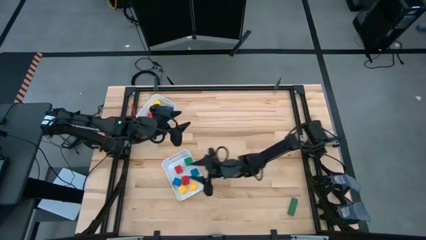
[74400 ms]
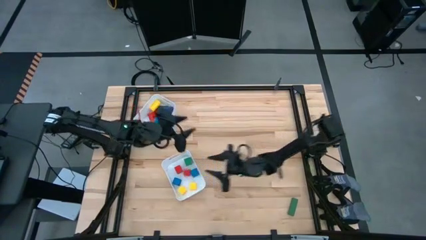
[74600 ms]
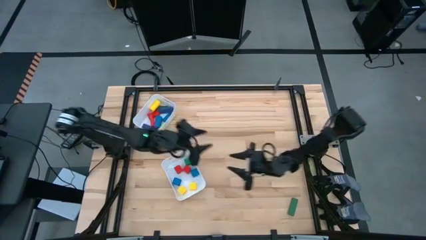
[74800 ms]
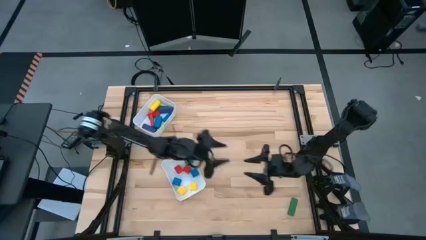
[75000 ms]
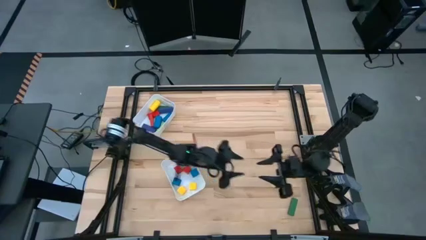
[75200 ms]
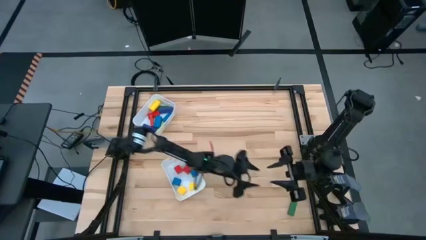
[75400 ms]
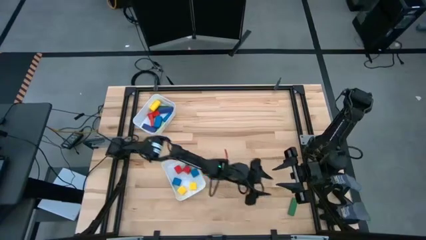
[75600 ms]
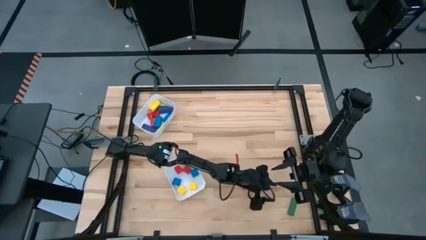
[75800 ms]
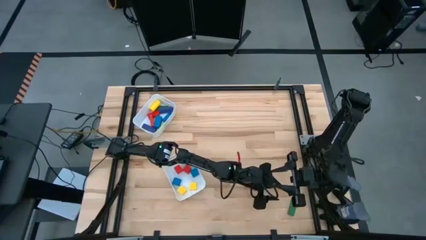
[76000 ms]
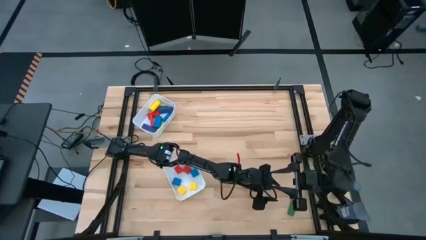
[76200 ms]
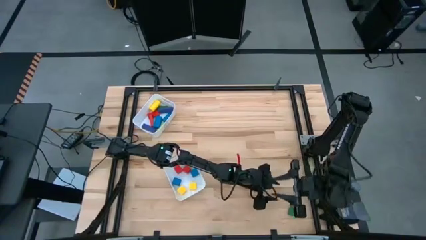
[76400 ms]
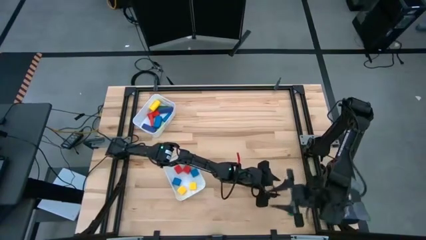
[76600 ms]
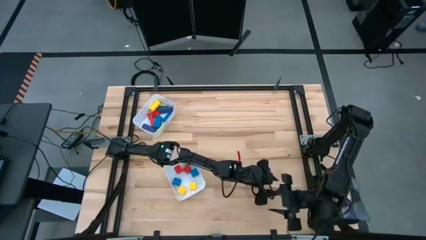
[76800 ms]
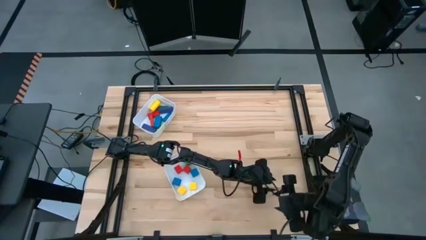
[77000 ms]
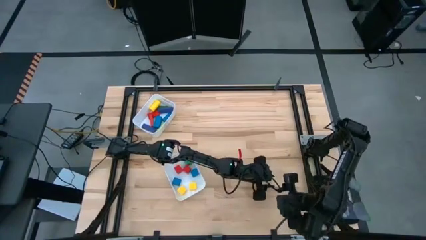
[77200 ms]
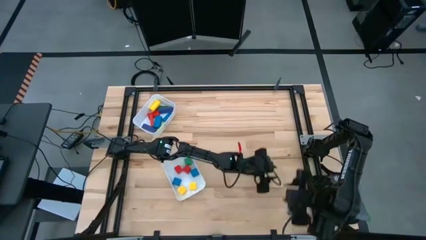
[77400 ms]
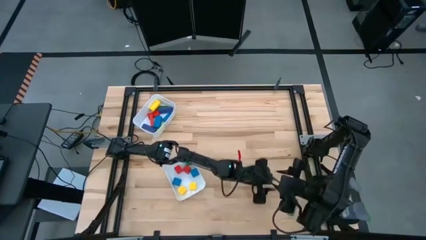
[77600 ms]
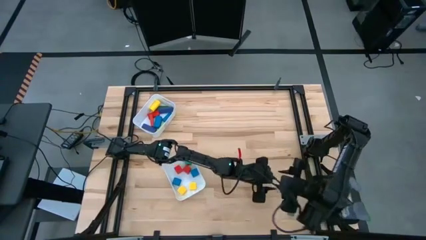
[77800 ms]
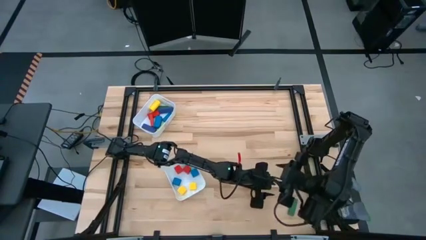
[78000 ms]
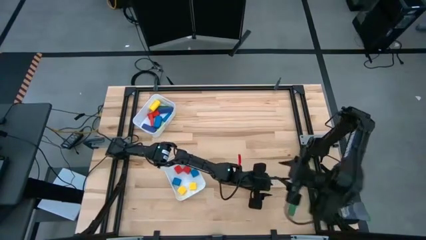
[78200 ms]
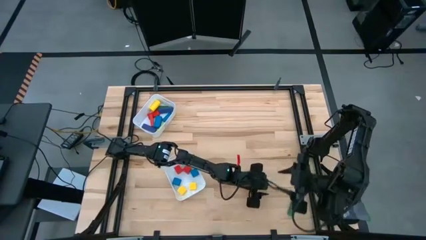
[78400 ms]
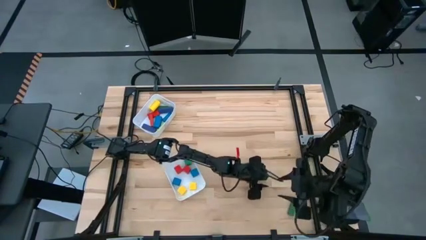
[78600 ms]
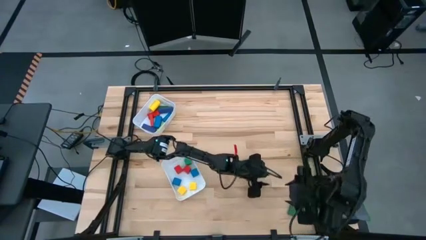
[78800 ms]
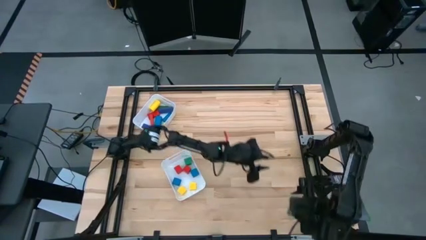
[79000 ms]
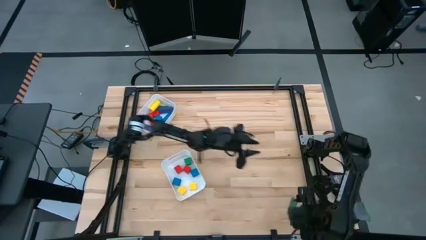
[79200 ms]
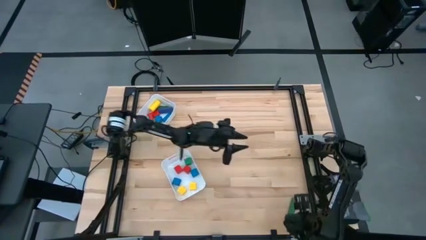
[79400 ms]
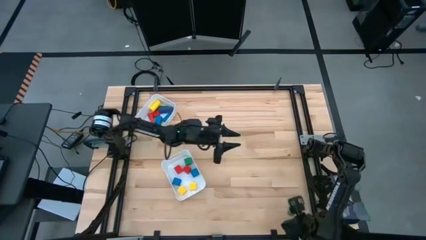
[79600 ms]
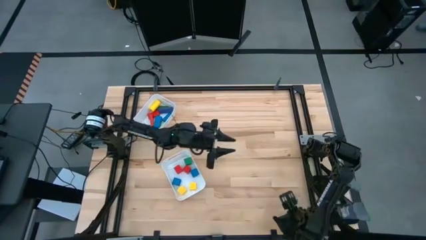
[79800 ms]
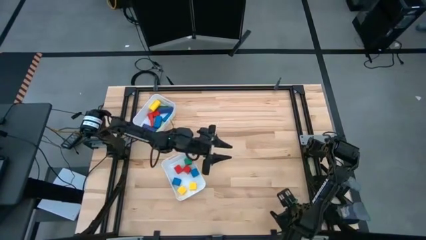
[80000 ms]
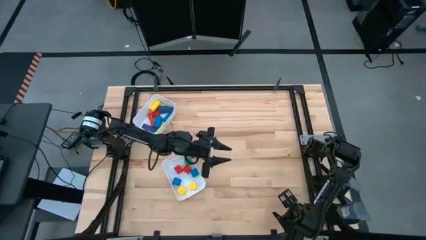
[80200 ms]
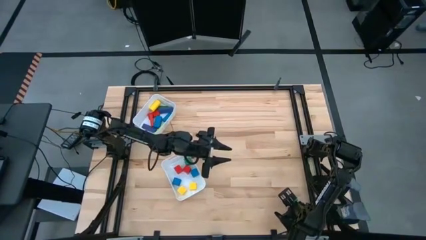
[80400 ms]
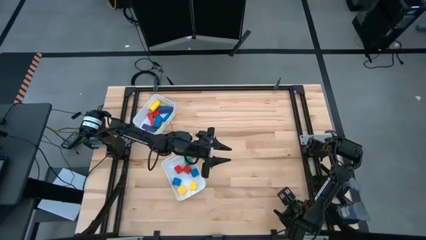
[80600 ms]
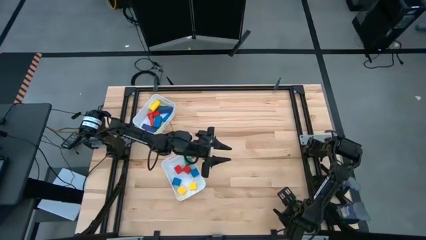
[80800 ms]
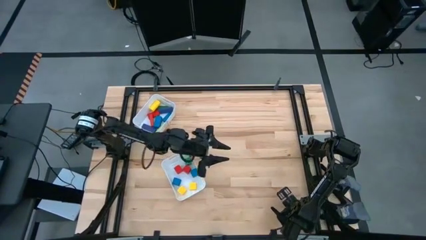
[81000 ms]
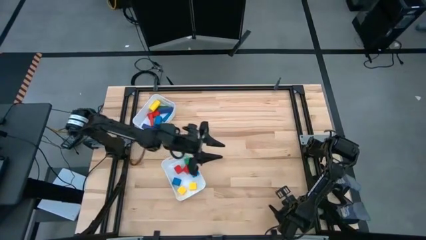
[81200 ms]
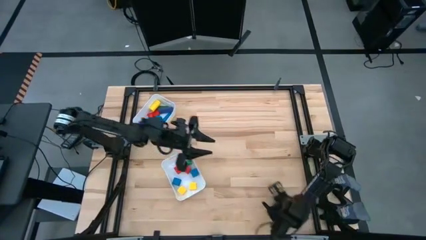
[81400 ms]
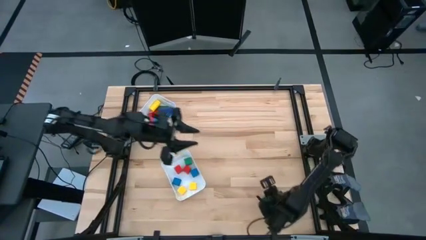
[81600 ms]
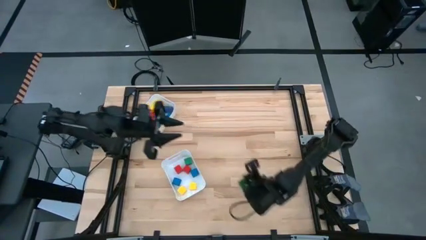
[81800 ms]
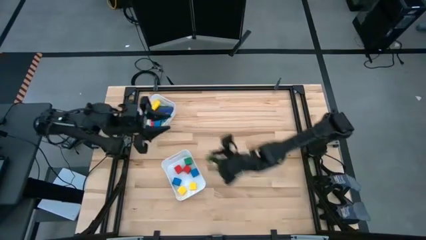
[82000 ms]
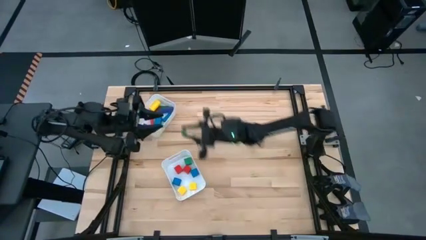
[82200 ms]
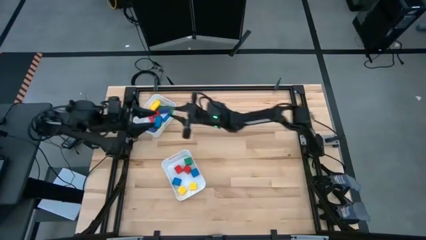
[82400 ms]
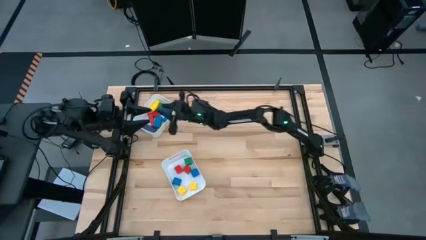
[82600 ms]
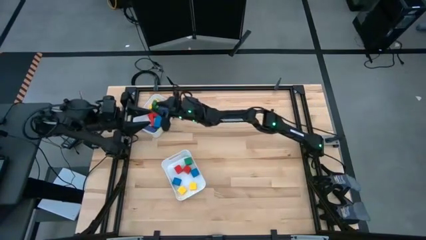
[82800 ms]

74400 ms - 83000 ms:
Task: Sort blocks by size
Put the green large block into the top white bin

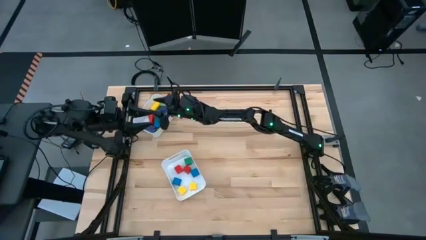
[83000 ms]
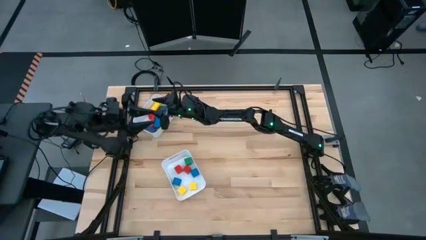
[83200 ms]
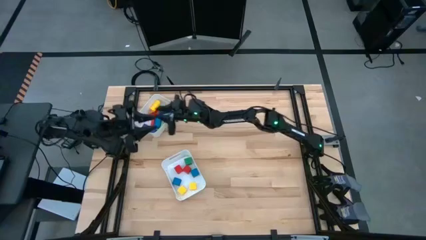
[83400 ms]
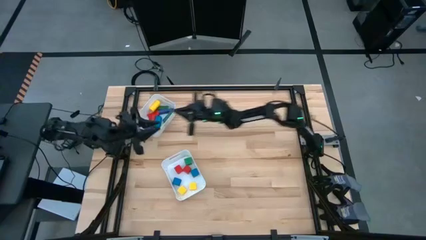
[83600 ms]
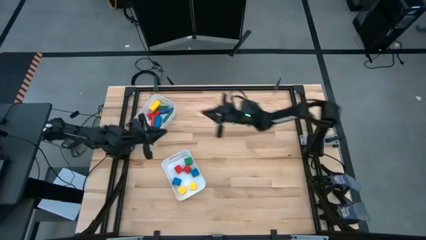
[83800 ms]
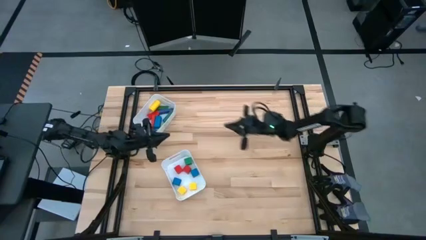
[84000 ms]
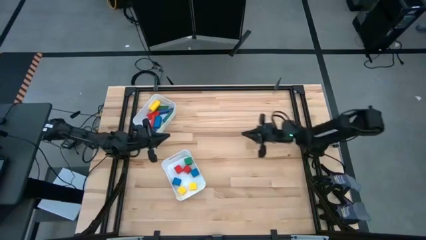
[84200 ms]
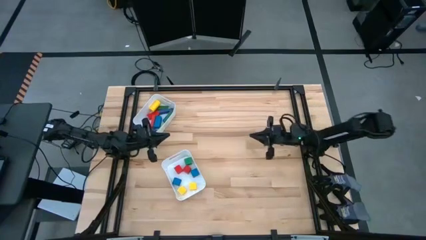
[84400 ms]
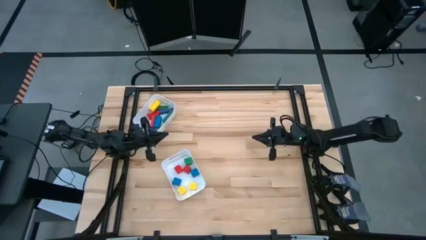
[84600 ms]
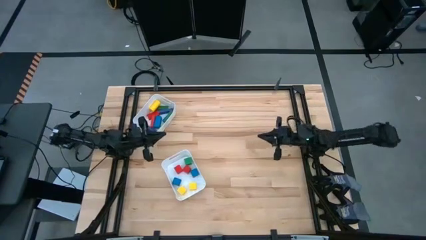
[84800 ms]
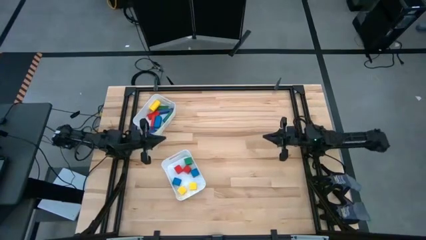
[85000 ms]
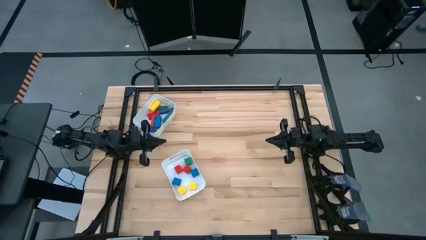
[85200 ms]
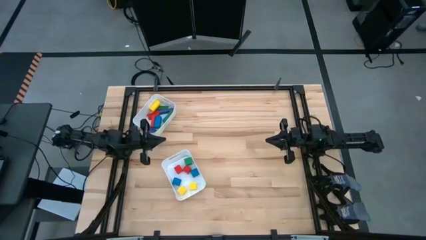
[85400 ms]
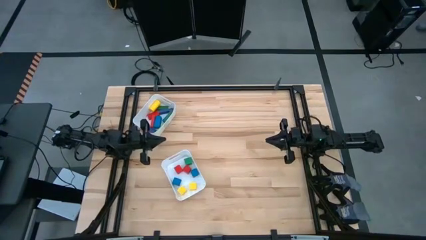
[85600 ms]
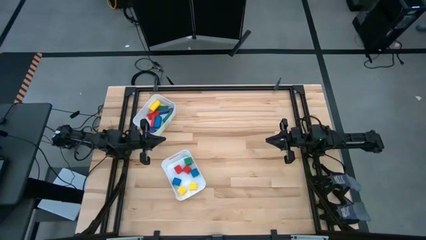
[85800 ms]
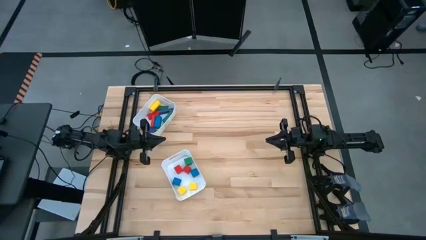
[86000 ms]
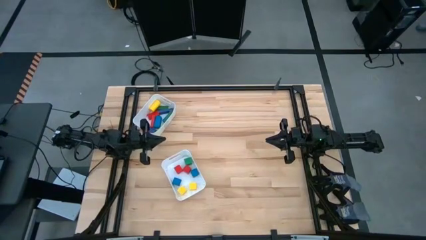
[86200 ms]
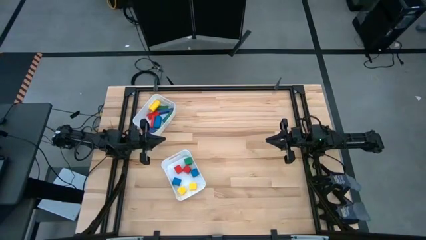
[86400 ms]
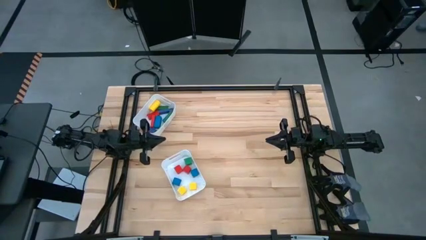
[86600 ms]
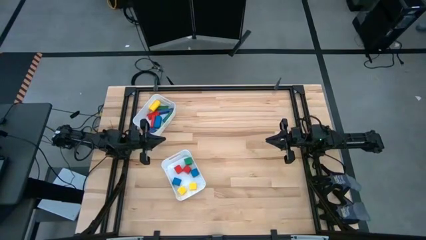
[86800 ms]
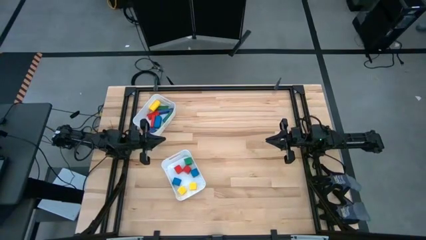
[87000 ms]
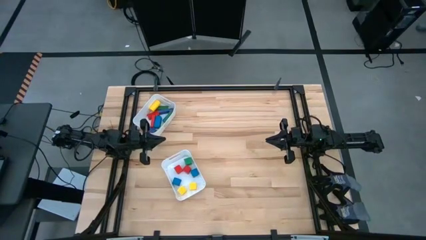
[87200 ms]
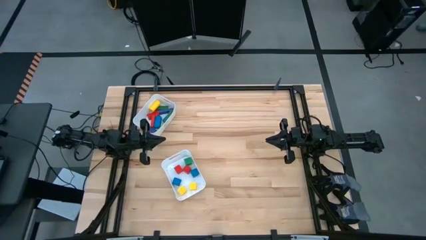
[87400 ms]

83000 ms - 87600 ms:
Return to Home Position

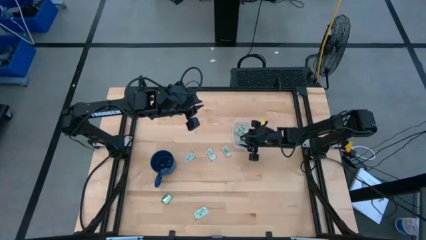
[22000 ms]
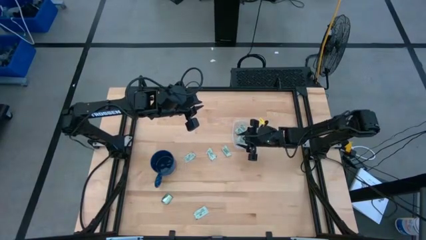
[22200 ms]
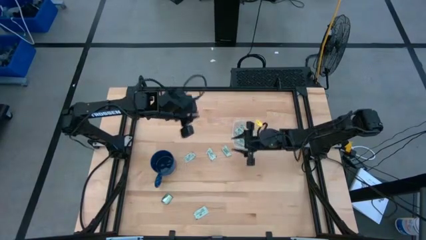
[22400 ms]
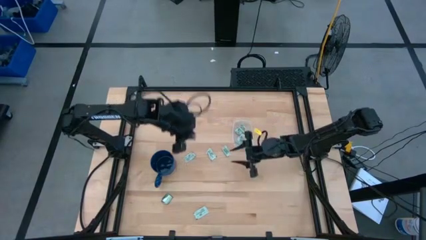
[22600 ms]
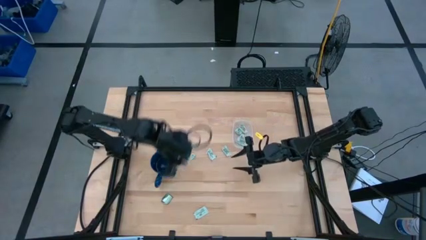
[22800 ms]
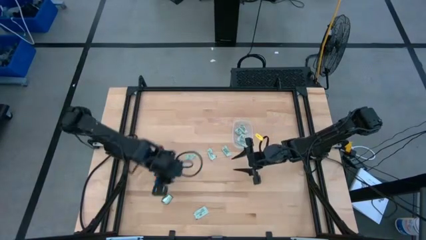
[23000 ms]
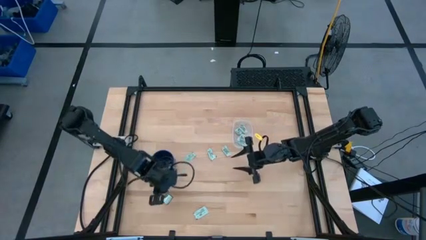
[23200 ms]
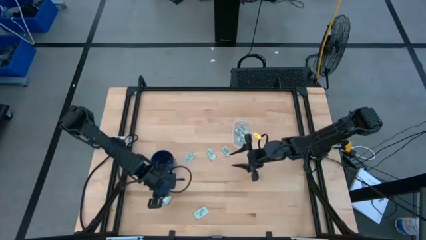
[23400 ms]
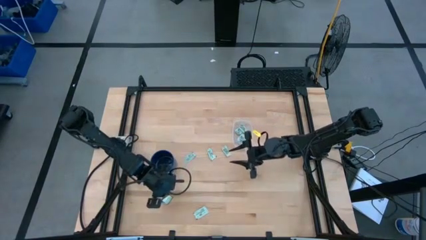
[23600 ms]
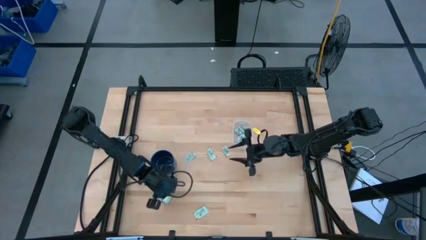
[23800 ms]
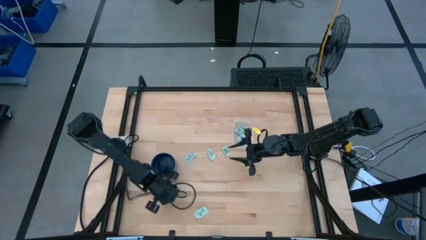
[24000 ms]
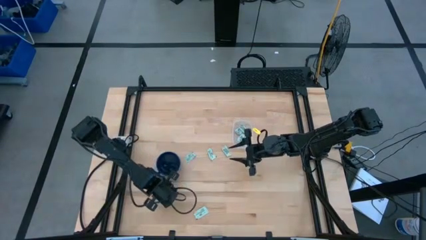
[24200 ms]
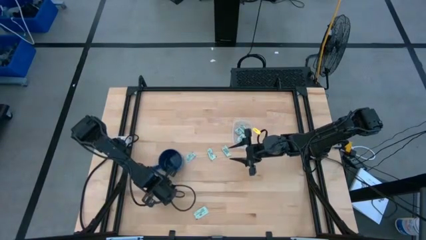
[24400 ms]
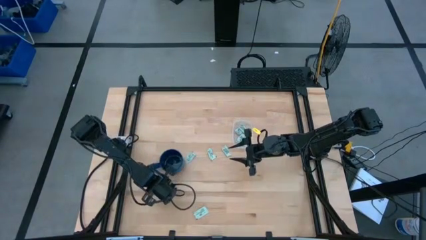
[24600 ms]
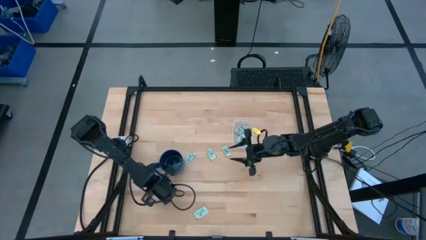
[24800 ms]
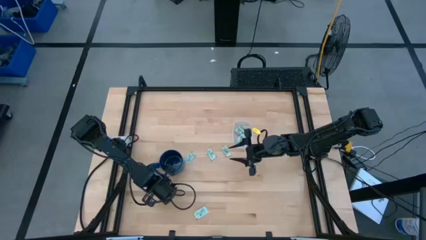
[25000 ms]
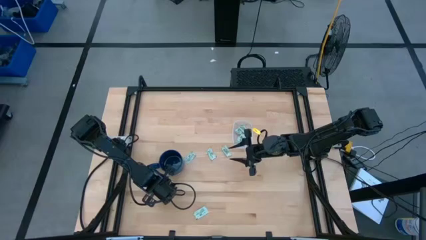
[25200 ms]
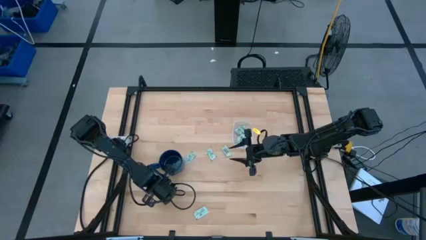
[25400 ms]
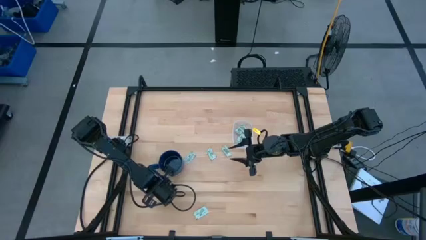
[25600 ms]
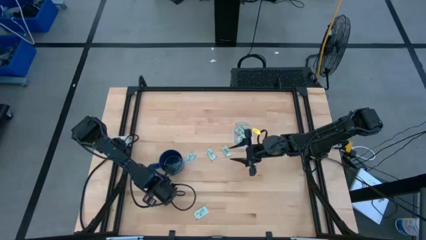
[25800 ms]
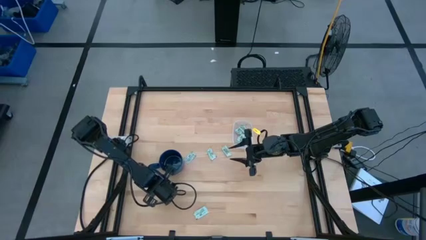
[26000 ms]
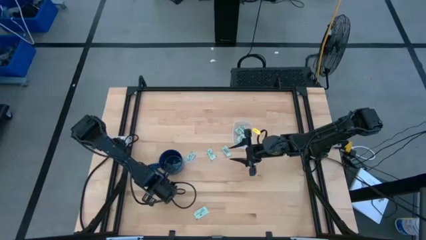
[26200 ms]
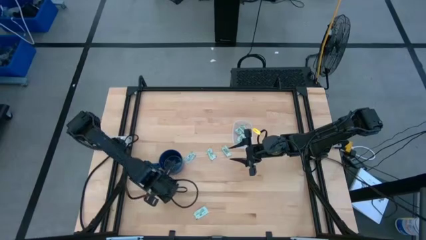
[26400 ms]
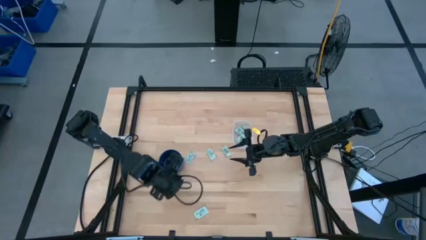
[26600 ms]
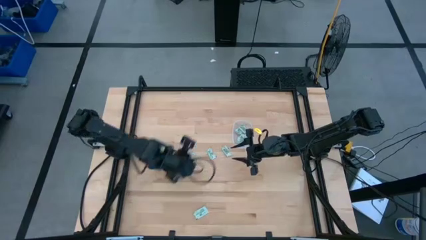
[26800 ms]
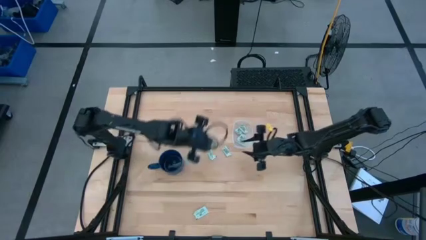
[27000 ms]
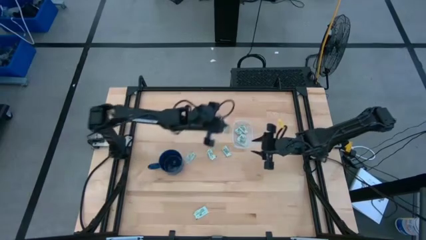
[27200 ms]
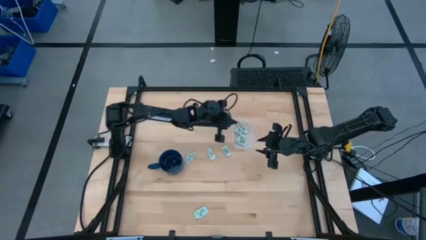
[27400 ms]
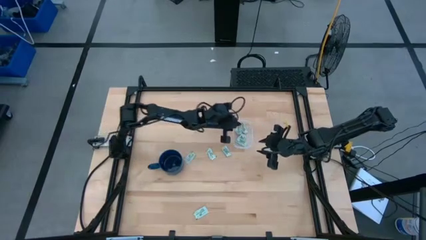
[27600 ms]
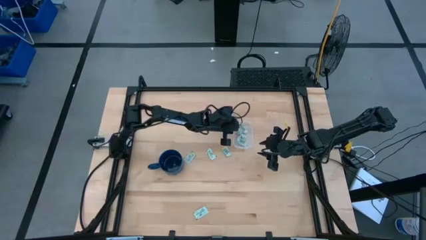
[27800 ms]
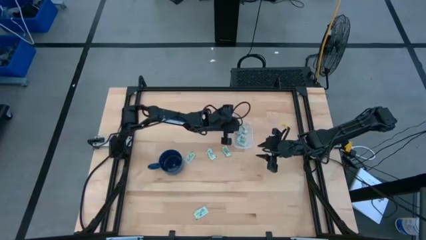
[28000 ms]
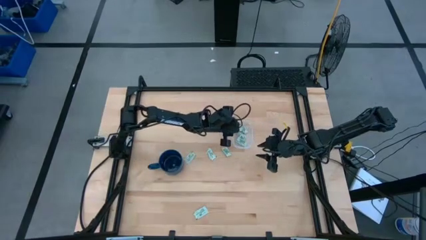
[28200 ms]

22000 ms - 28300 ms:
Task: Pick and place Stevia / Truvia into bins
Put the green truvia packet into the transparent container
